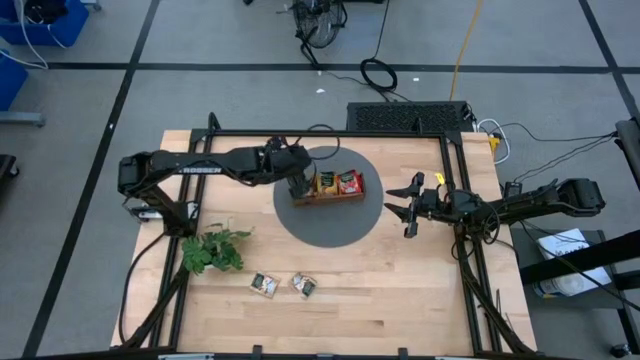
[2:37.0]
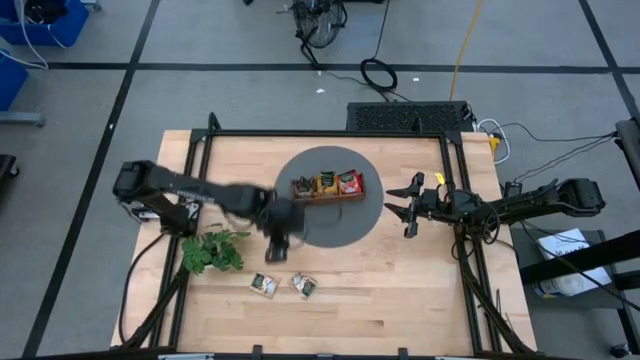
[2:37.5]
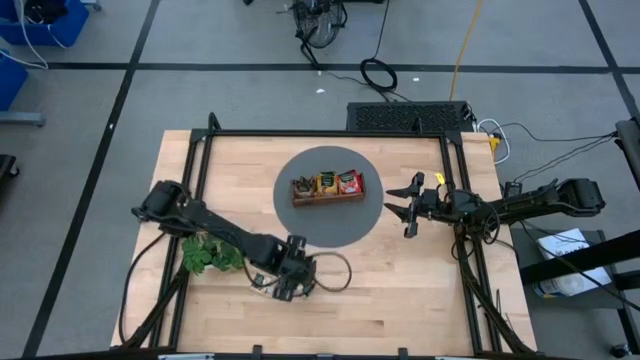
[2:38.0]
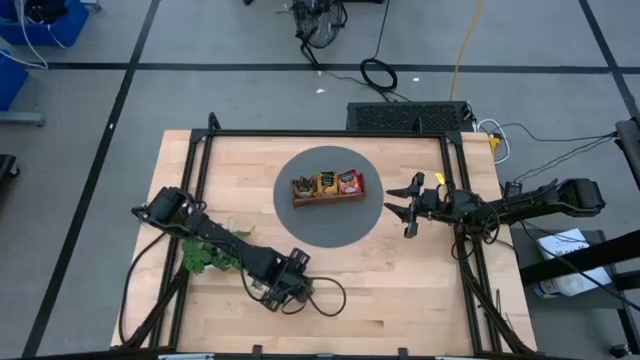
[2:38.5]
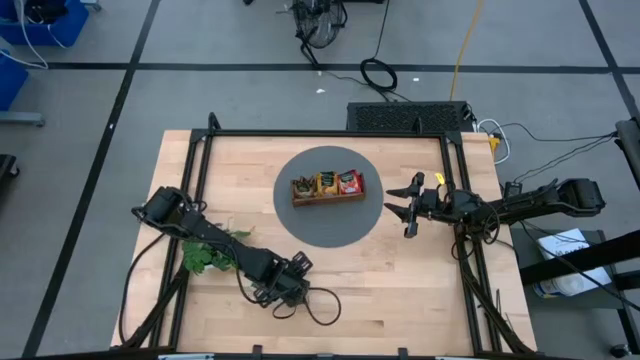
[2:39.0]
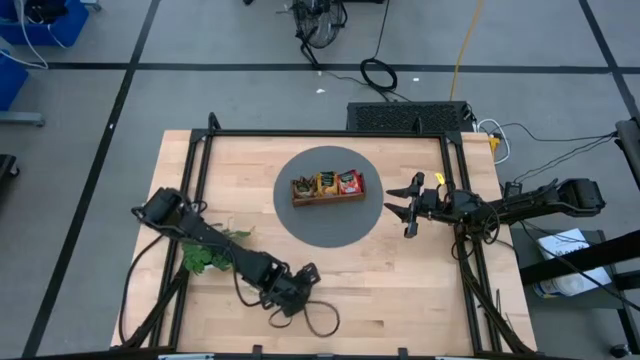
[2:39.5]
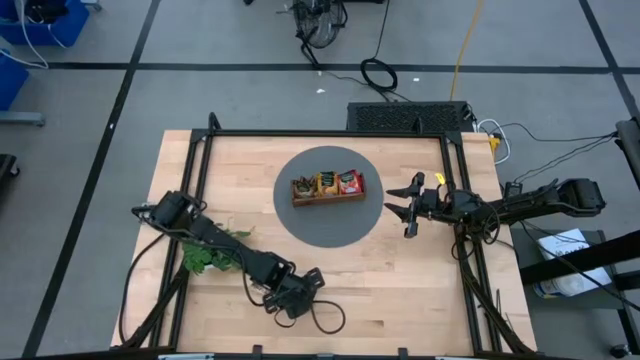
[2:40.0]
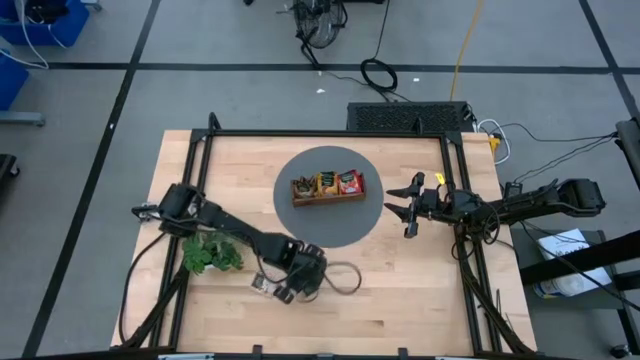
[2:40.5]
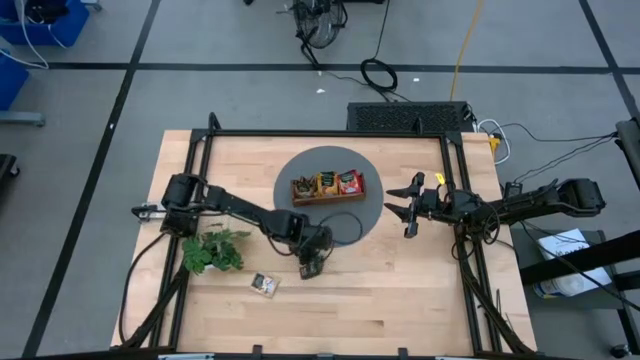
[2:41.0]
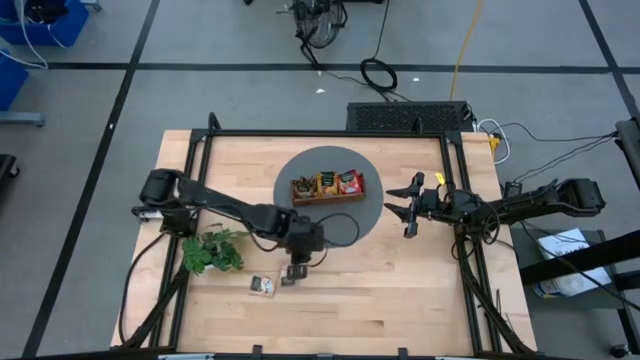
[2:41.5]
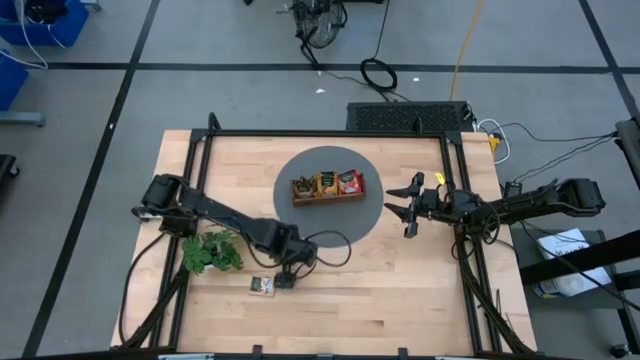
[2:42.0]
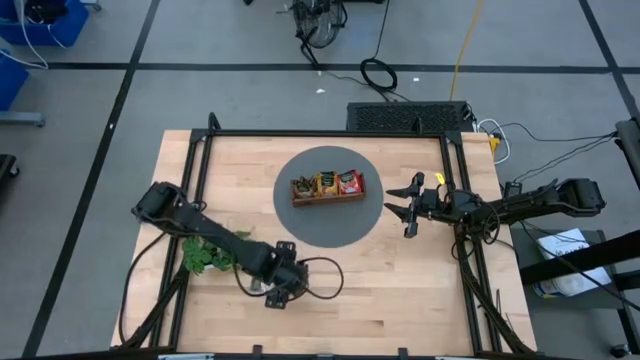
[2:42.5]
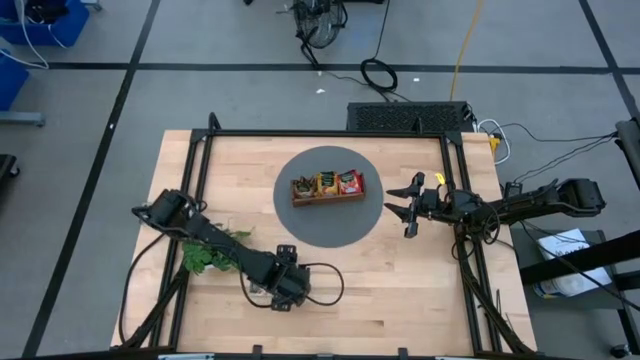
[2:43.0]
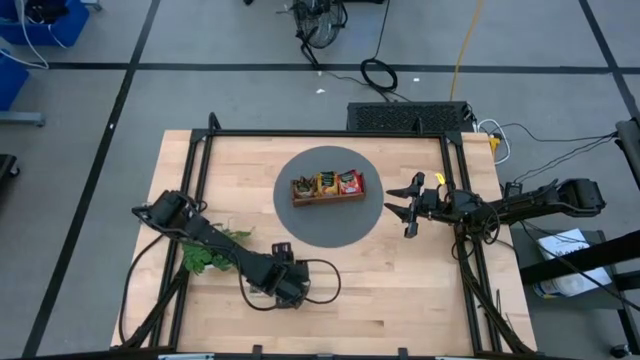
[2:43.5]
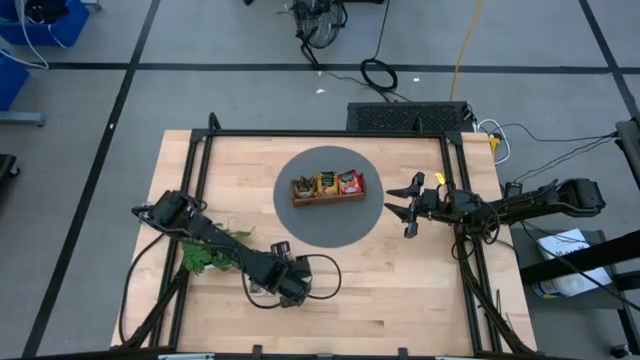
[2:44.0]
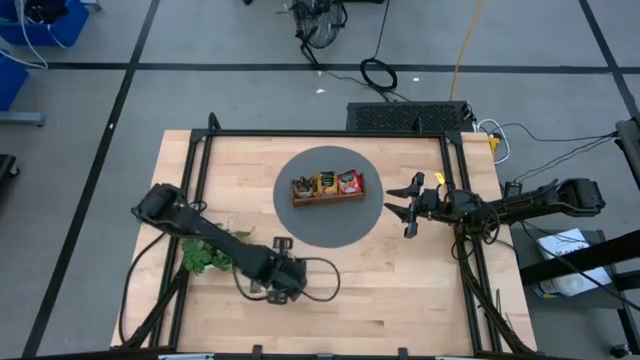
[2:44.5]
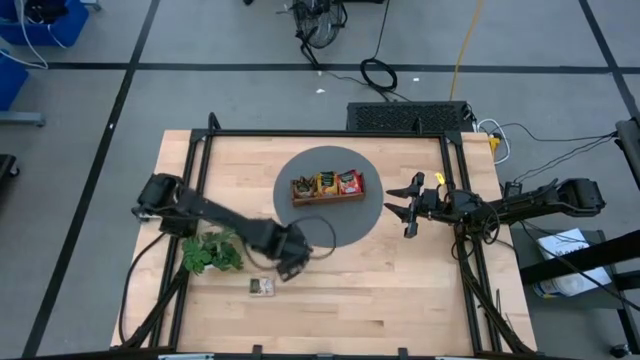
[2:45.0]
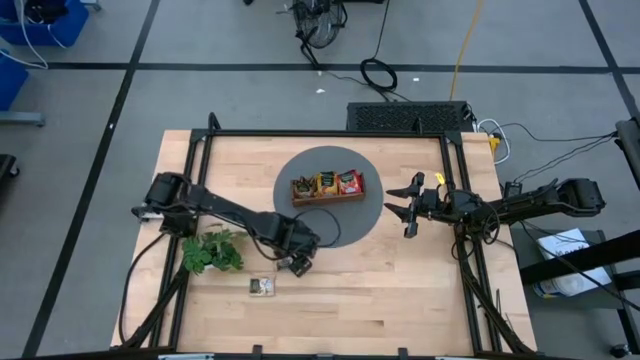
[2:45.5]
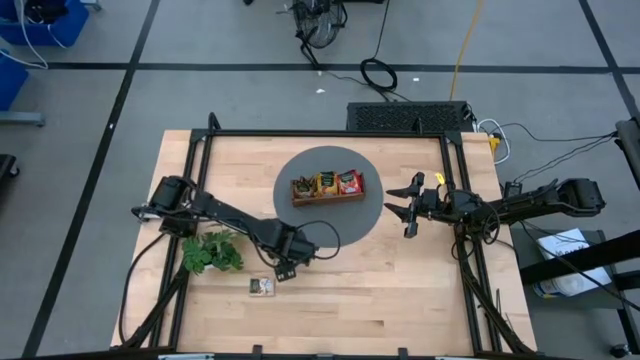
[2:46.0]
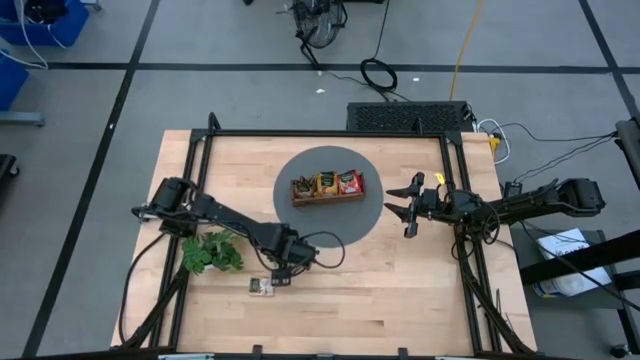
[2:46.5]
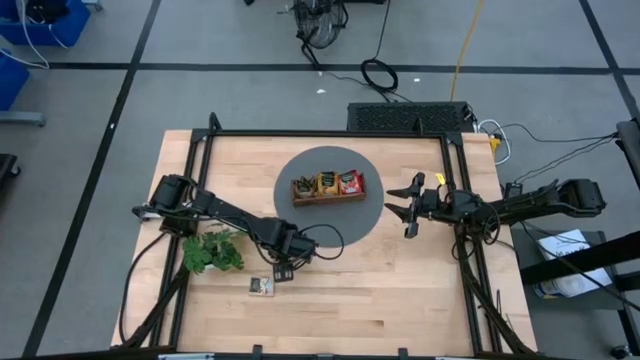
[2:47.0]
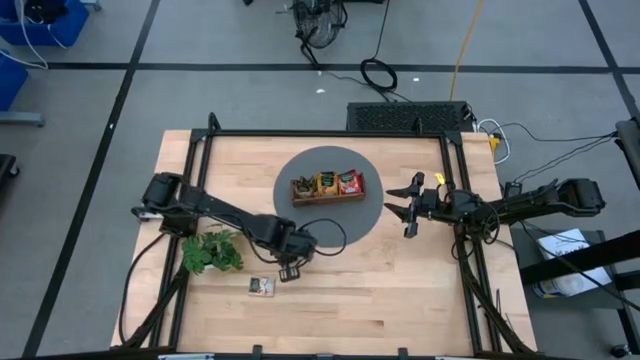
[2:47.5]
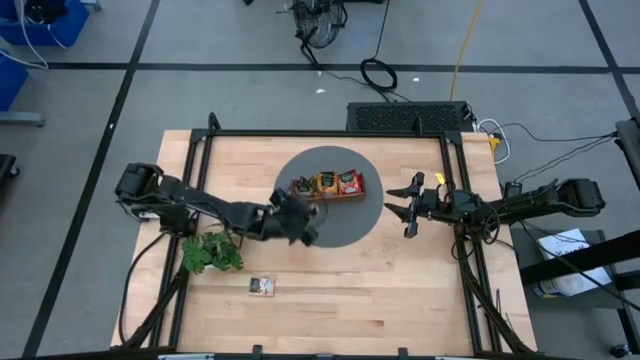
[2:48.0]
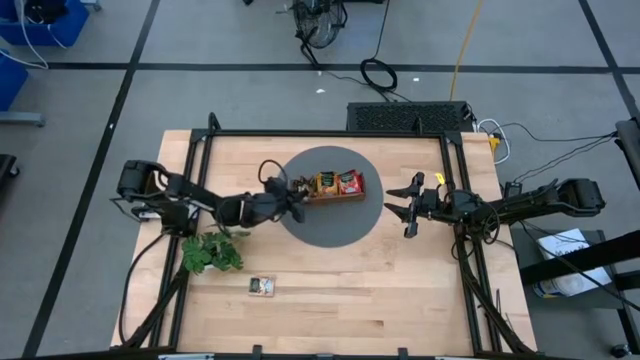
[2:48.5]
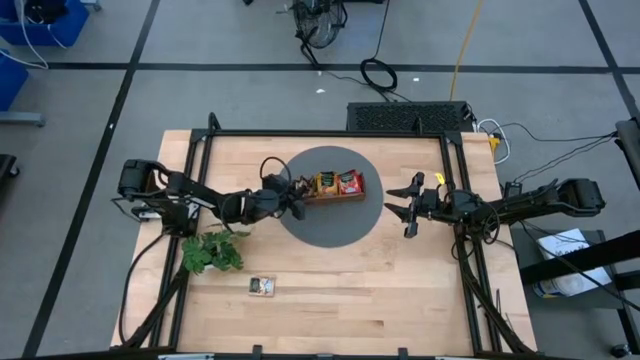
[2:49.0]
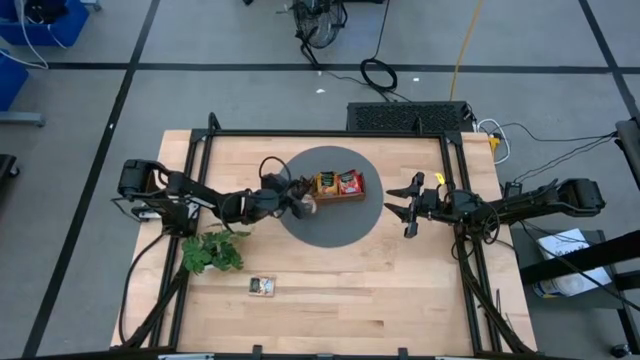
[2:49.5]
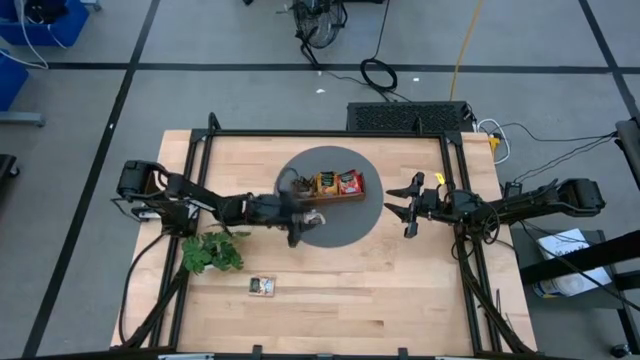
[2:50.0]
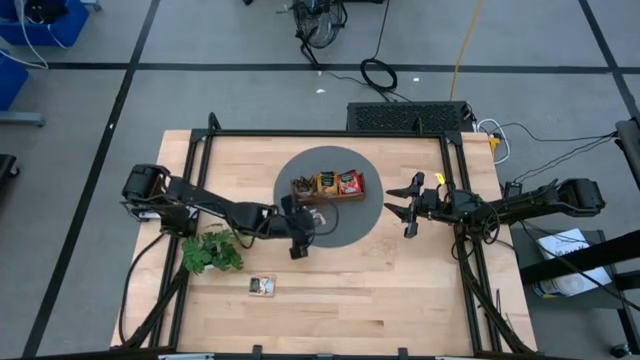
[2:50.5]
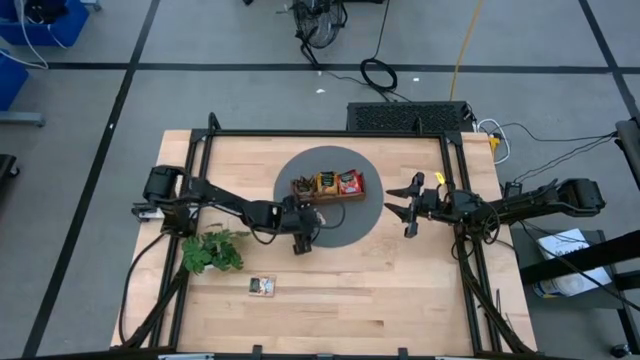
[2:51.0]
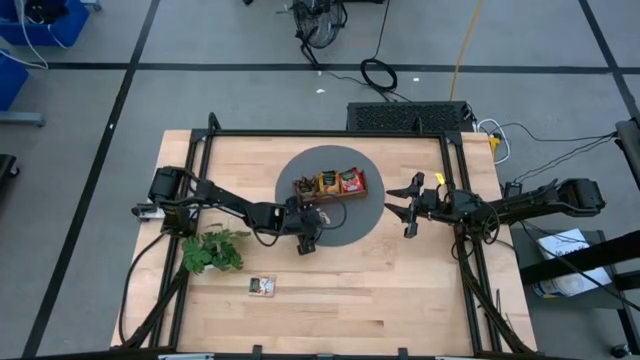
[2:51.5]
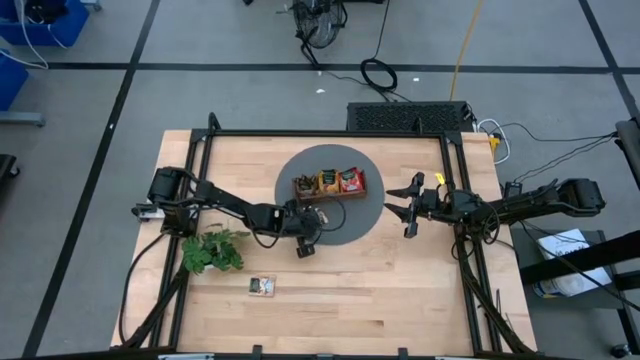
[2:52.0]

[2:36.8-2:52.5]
Task: Pick & Place Tea
Put the brown tea bag into the left section of the wooden organizer

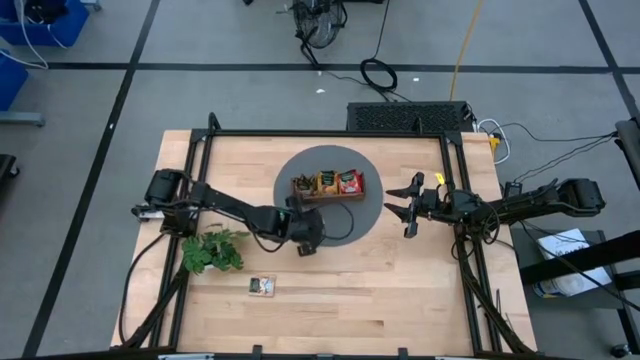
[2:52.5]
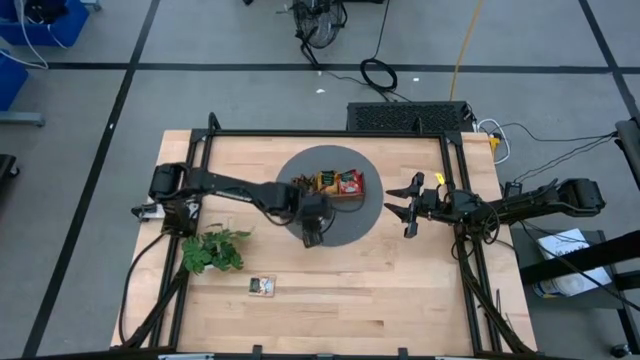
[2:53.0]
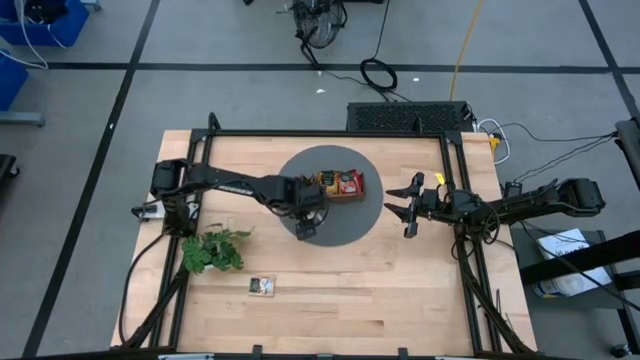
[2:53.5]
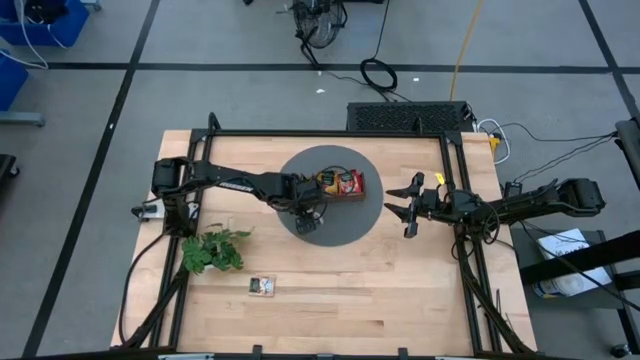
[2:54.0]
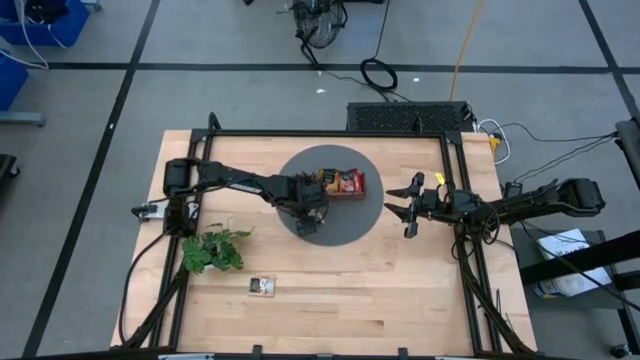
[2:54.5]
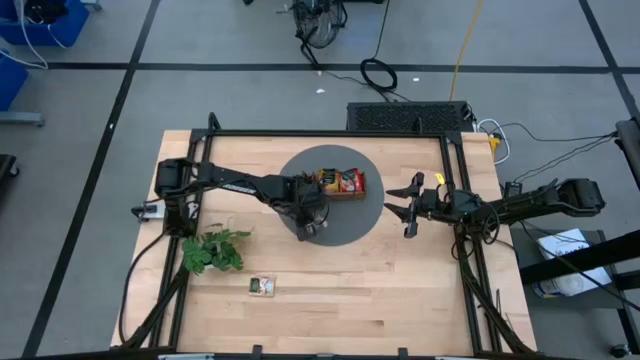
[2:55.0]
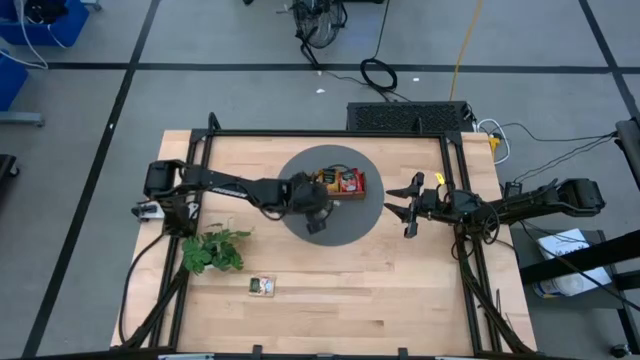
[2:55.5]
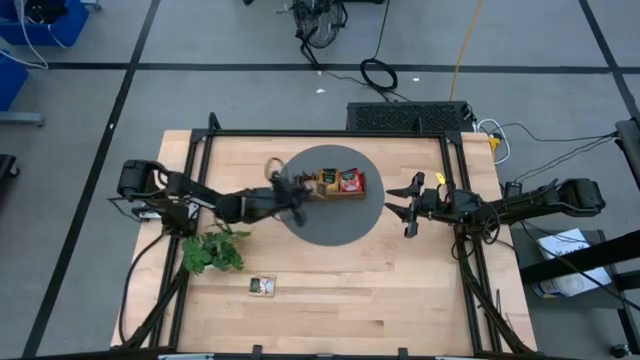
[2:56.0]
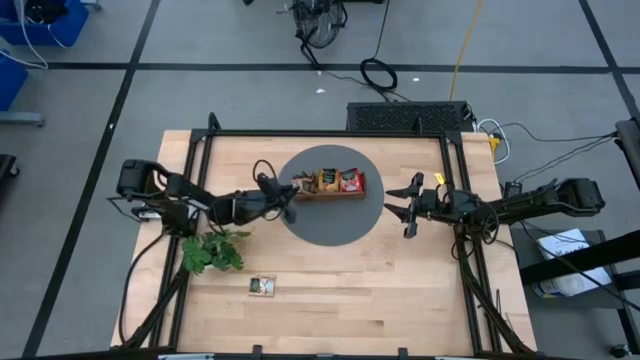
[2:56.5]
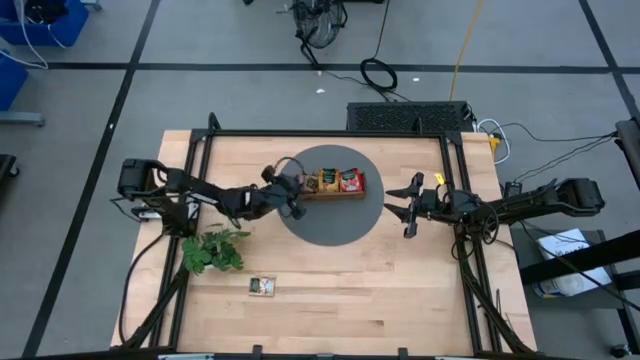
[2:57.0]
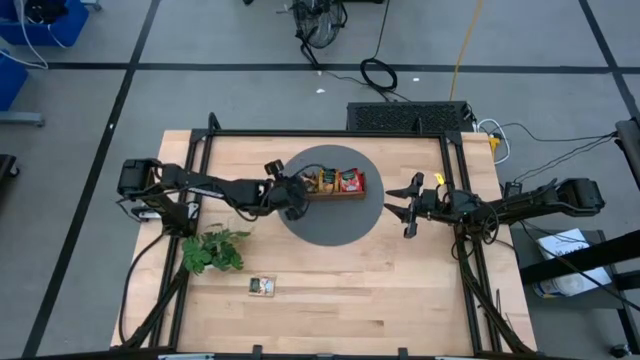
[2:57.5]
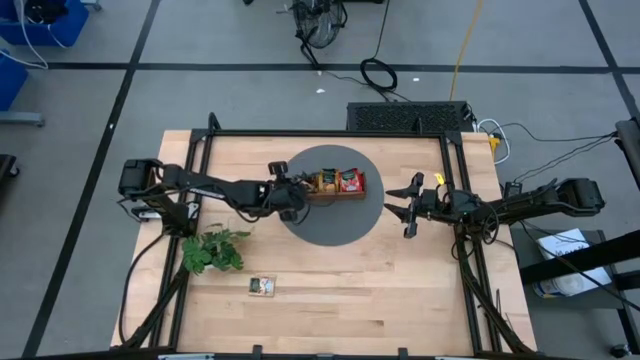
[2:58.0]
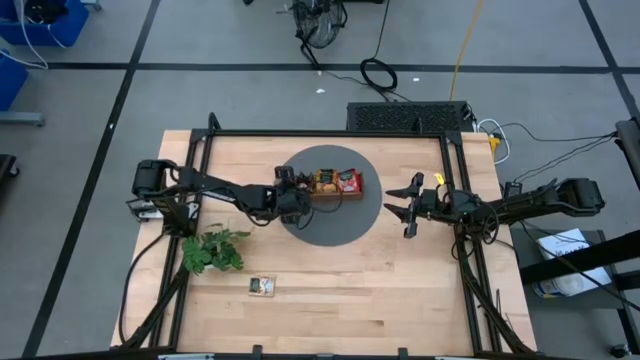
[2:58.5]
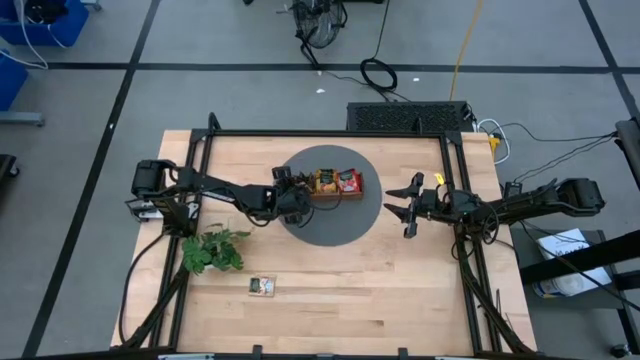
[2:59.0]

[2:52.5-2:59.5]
Put the brown tea bag into the left section of the wooden organizer
